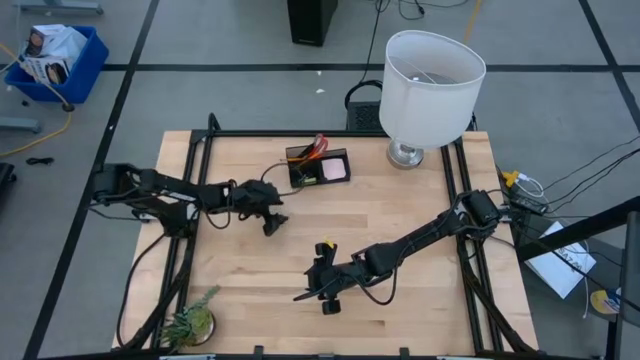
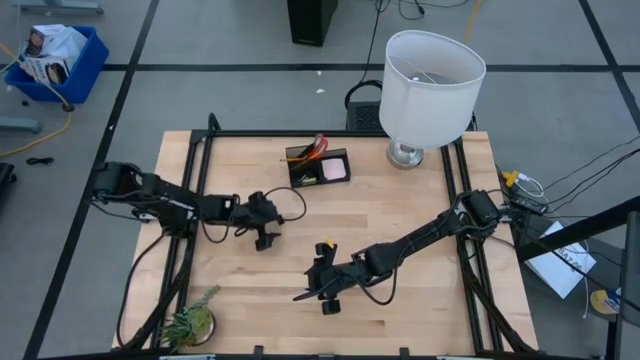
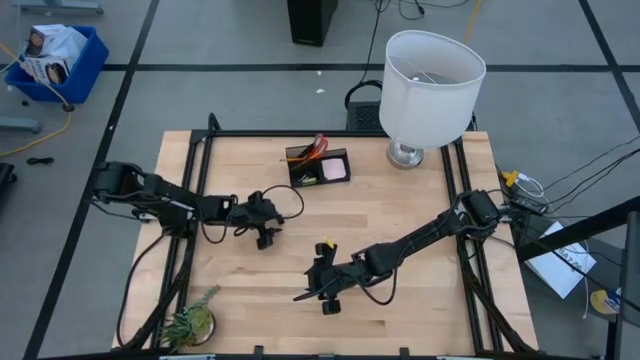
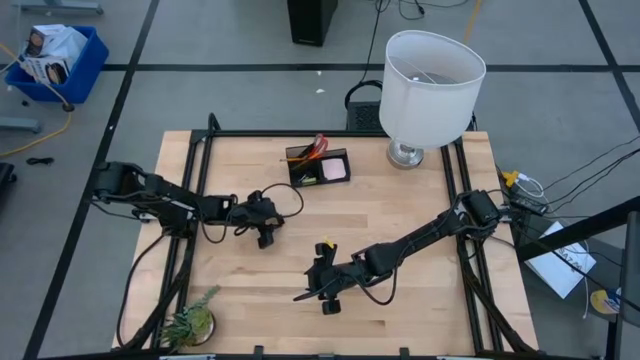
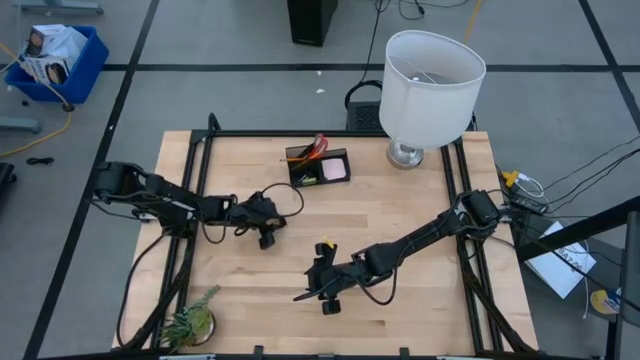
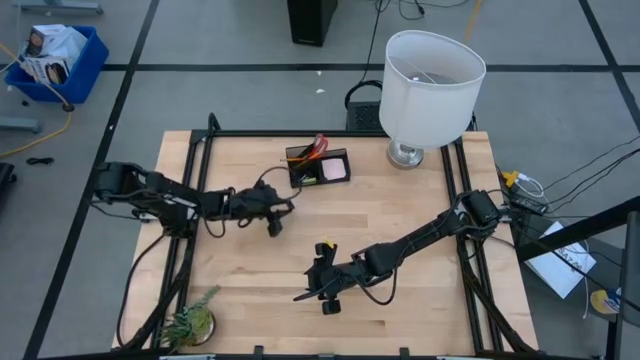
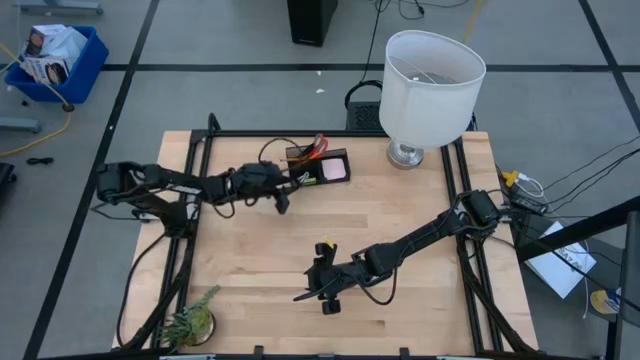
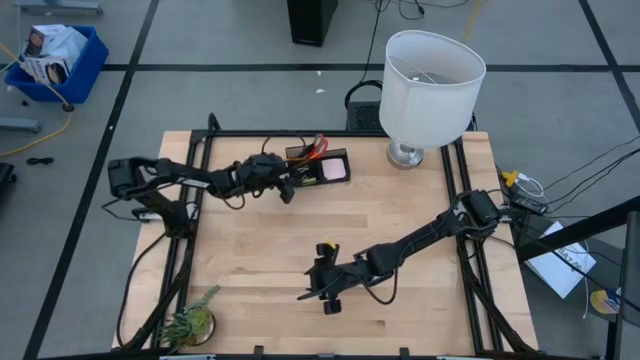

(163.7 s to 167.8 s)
Task: Pick and place office supplies into organizer
Put the black binder clip into the black desk organizer

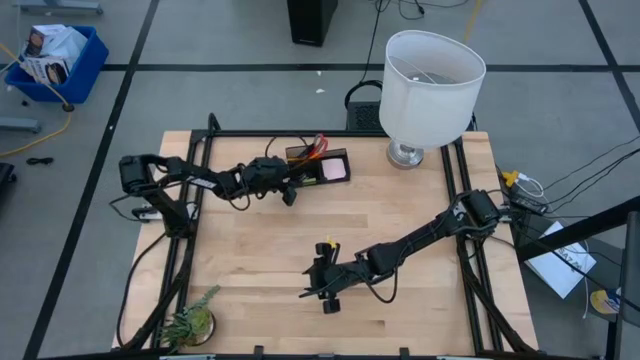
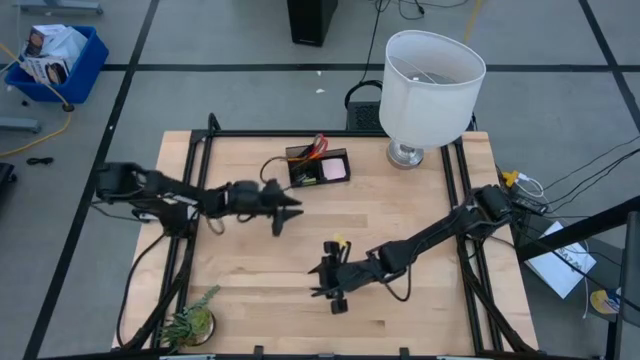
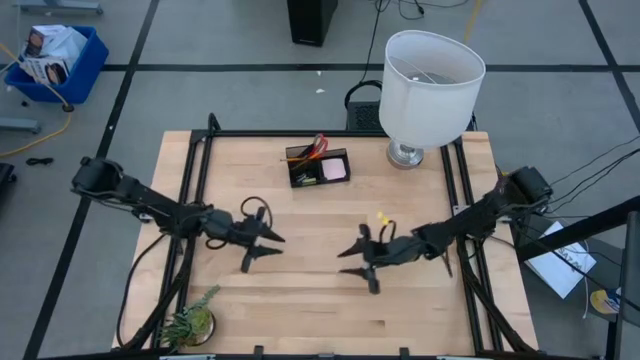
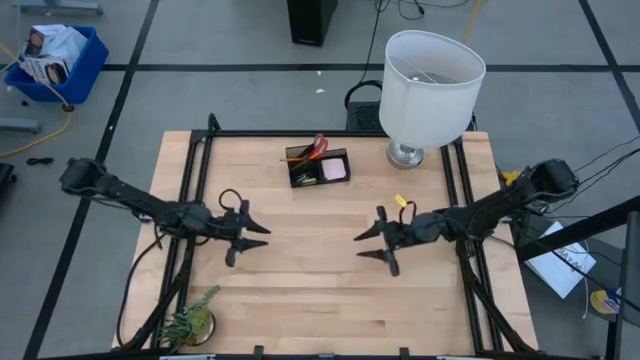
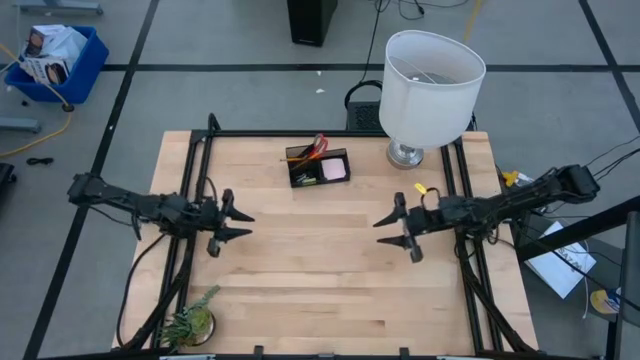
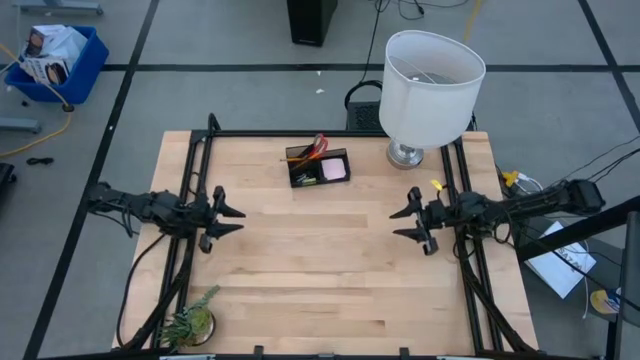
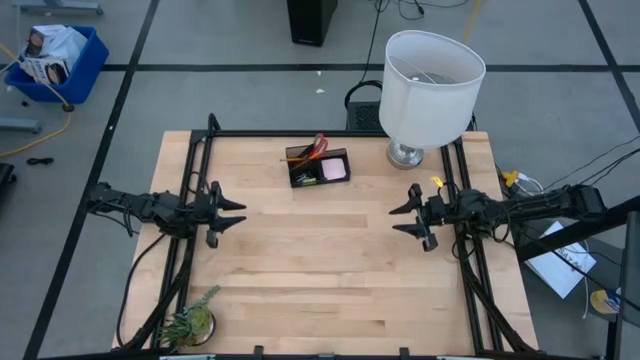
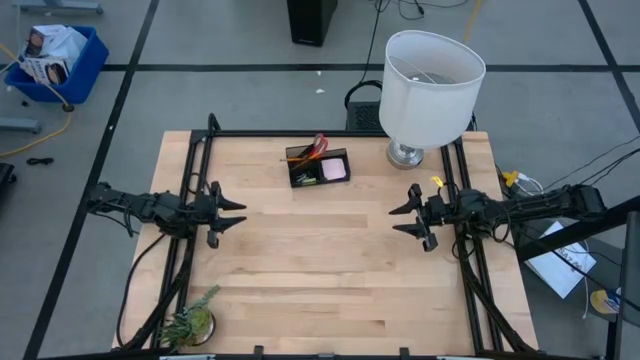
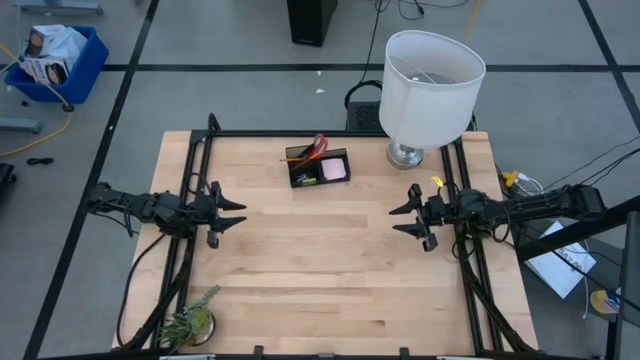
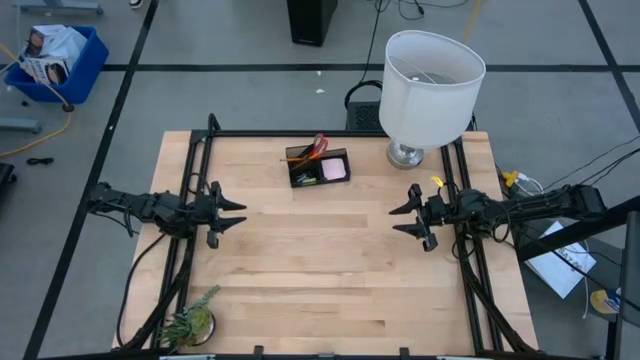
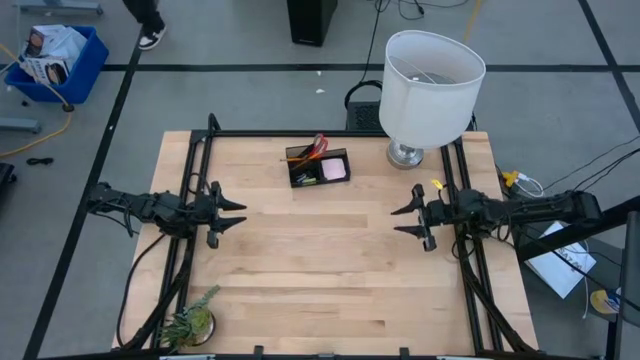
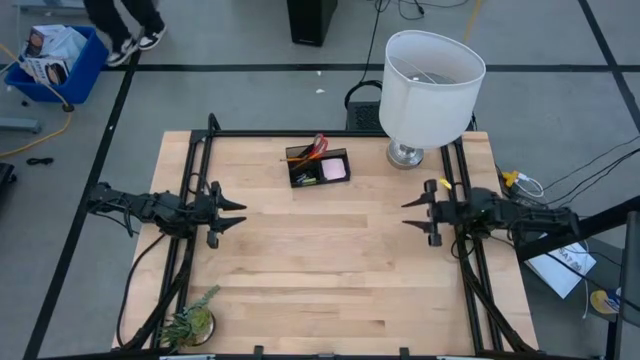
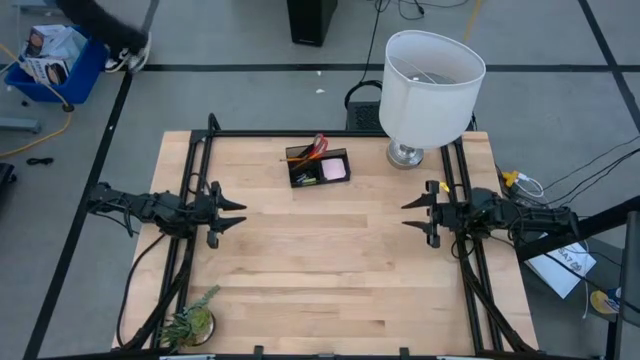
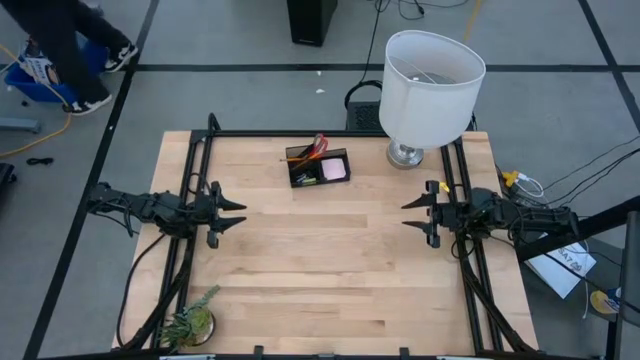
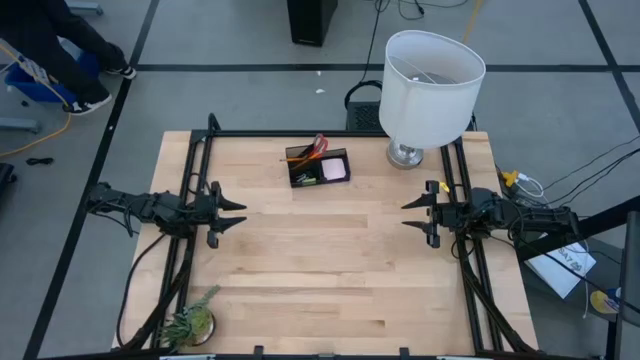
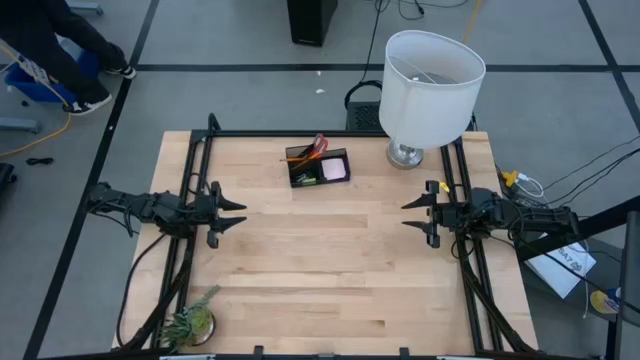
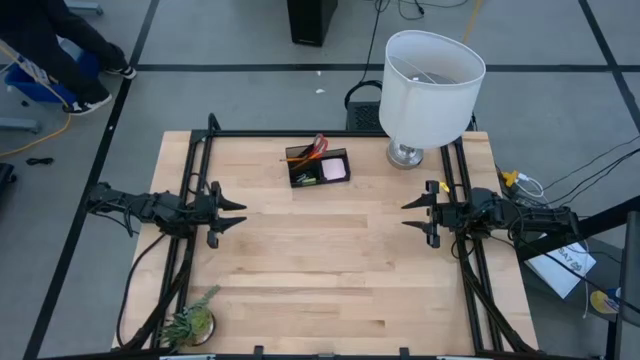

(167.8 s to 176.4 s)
Return to Home Position

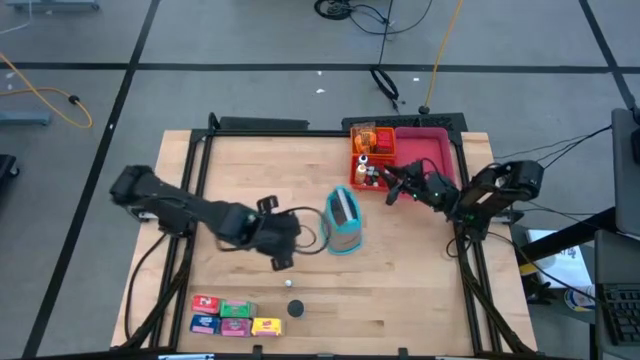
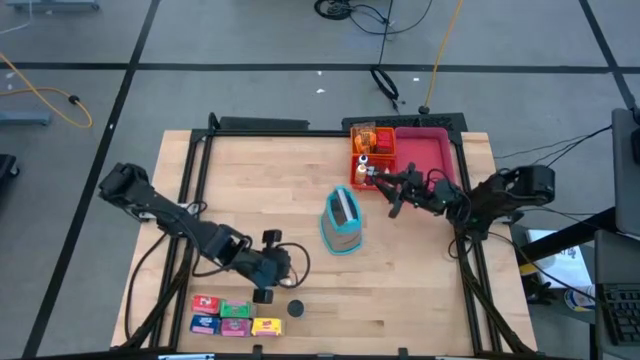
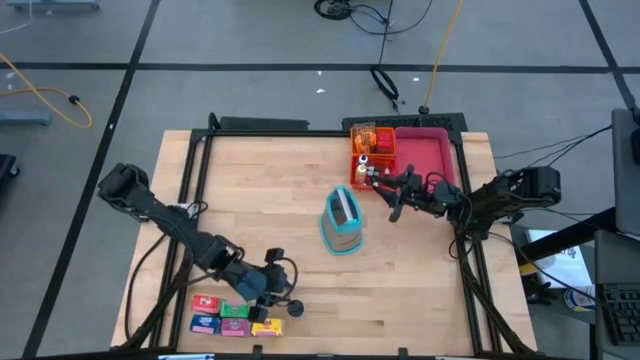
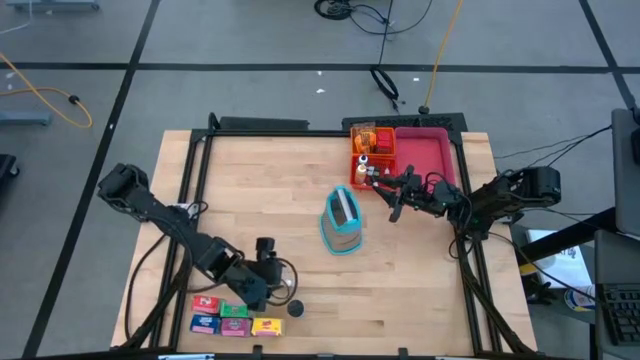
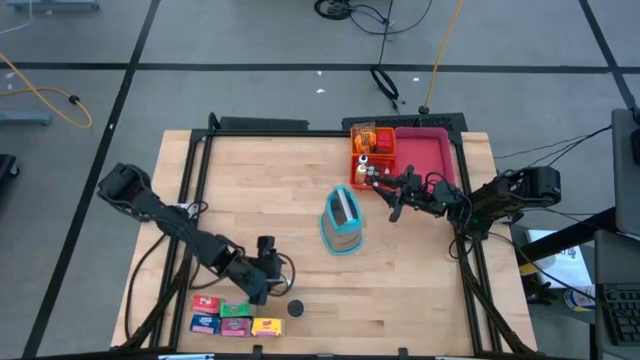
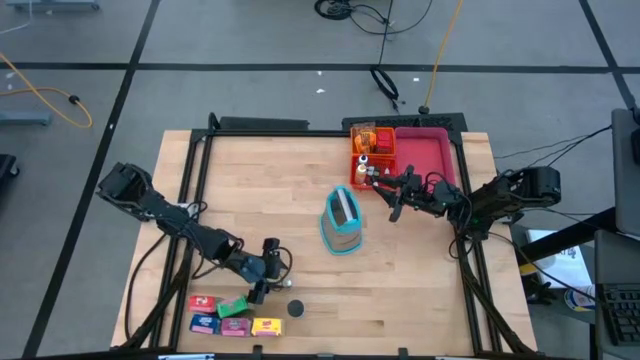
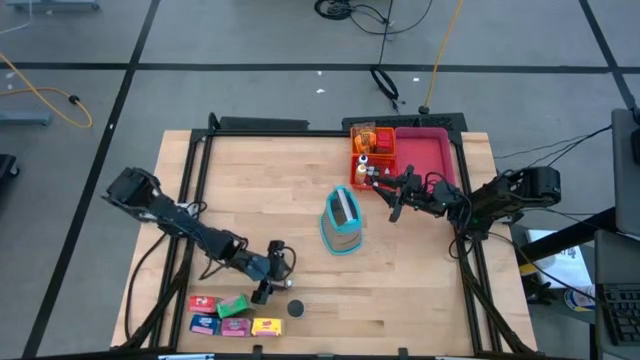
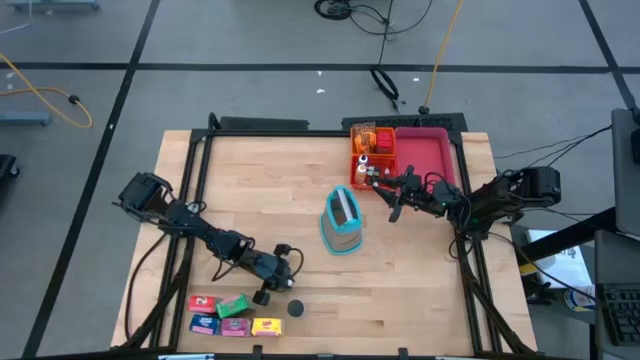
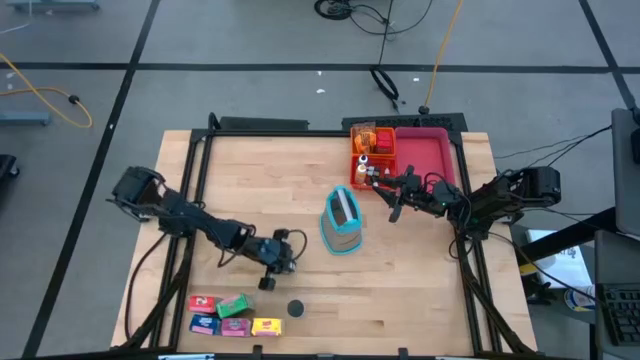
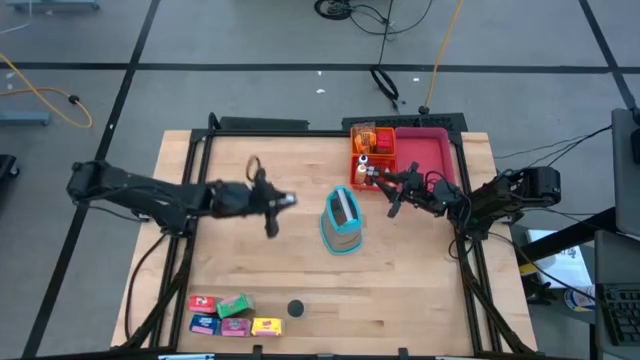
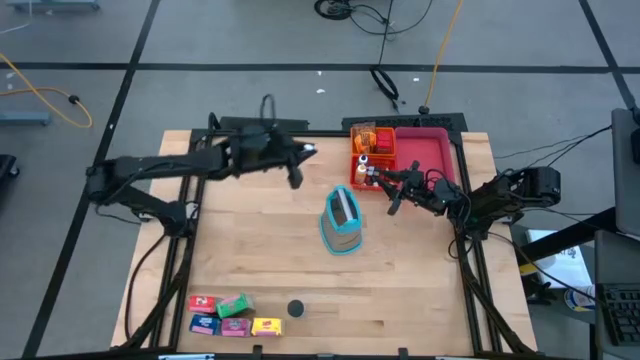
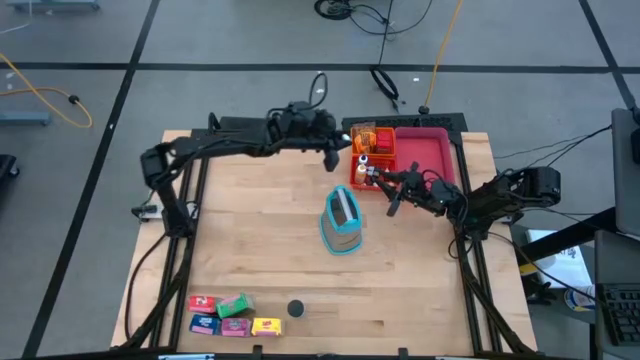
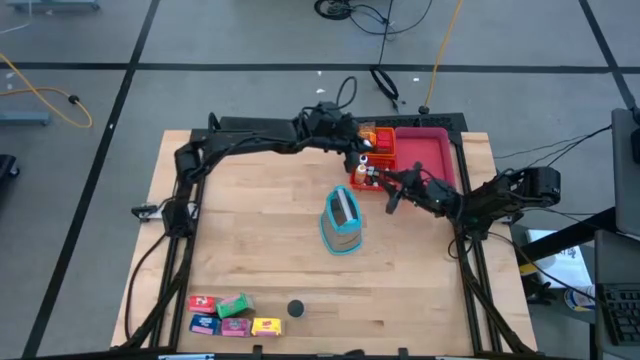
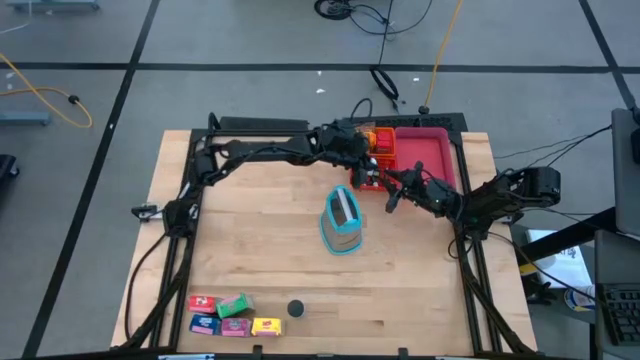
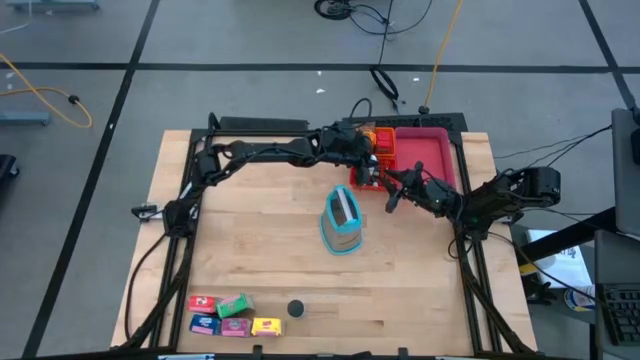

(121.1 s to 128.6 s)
Task: Pick & Place Kitchen Items
Put the small red food coloring bottle into the red bin
